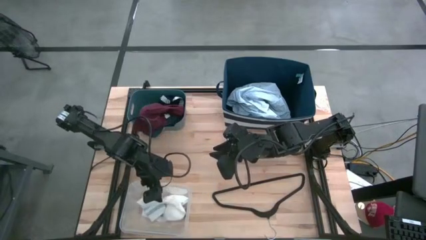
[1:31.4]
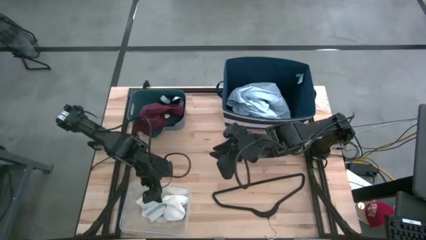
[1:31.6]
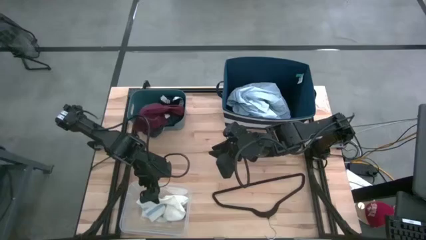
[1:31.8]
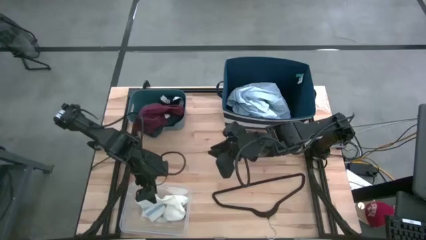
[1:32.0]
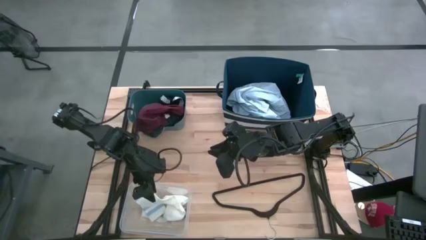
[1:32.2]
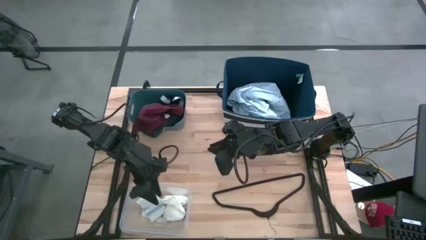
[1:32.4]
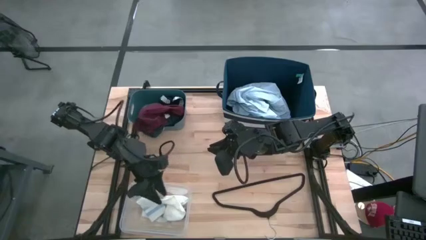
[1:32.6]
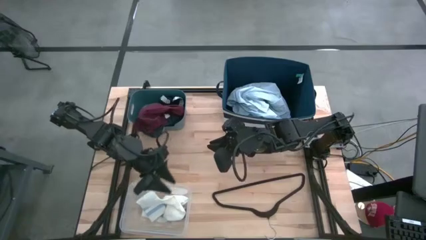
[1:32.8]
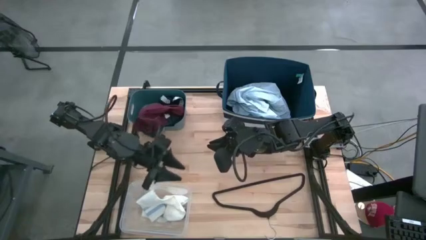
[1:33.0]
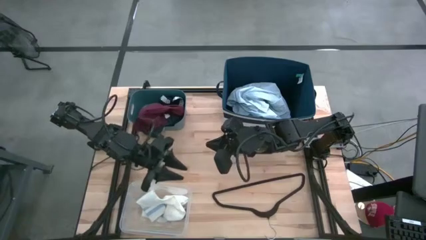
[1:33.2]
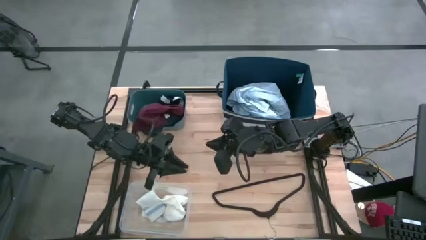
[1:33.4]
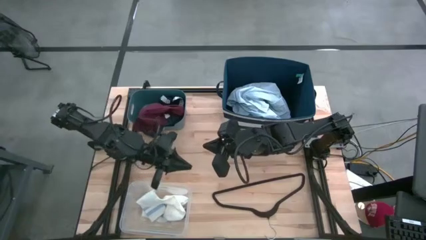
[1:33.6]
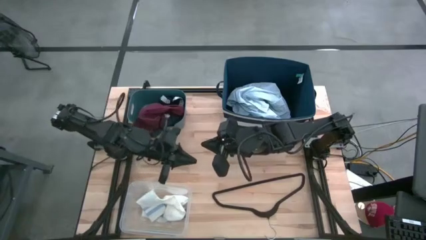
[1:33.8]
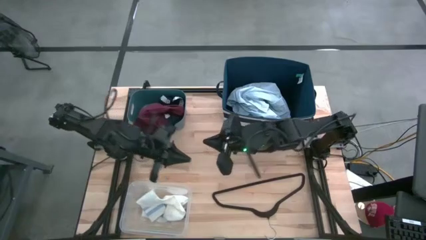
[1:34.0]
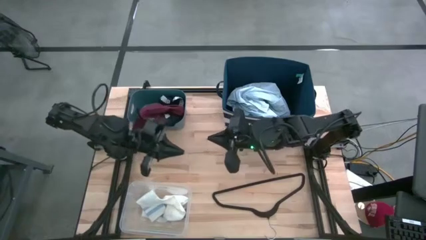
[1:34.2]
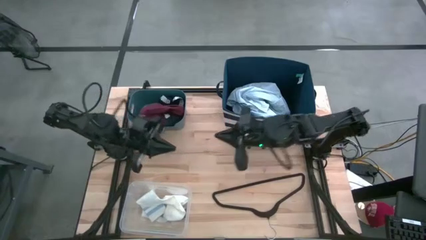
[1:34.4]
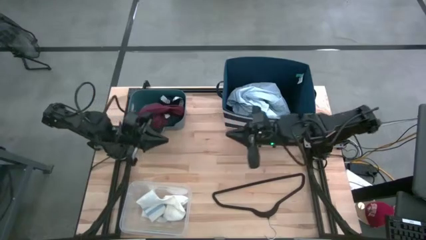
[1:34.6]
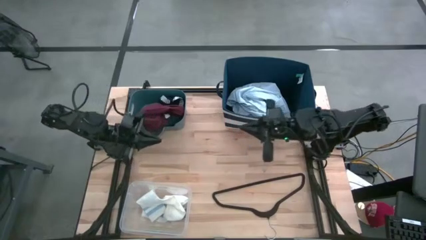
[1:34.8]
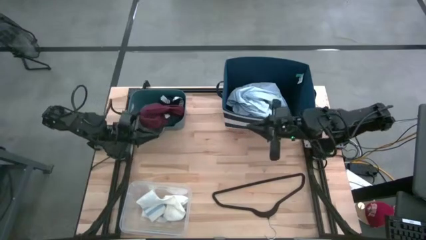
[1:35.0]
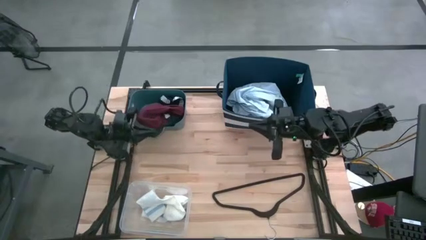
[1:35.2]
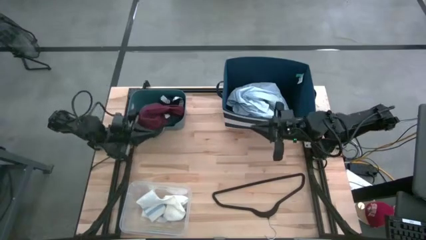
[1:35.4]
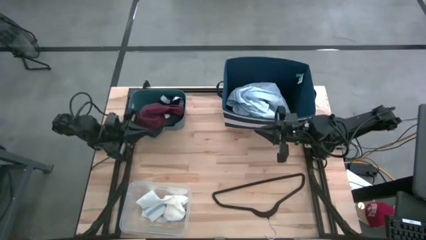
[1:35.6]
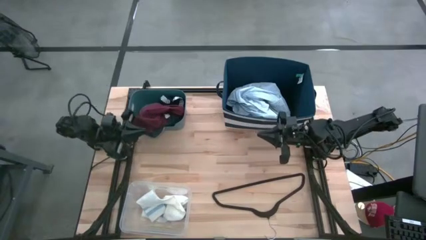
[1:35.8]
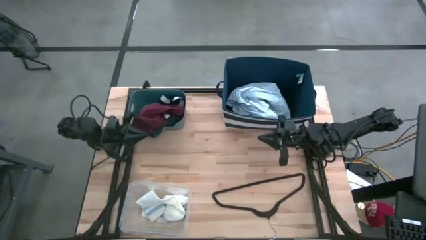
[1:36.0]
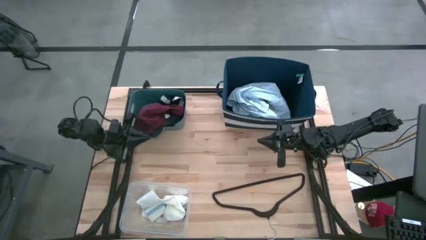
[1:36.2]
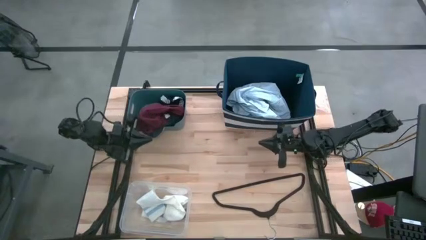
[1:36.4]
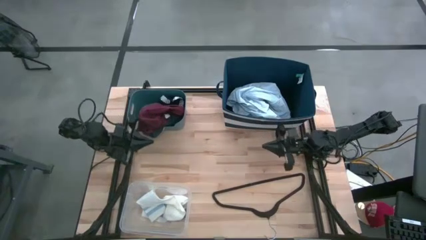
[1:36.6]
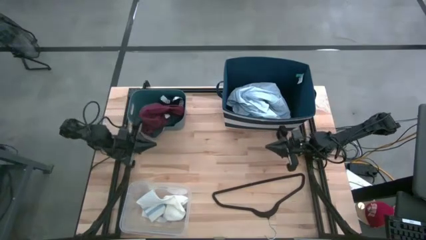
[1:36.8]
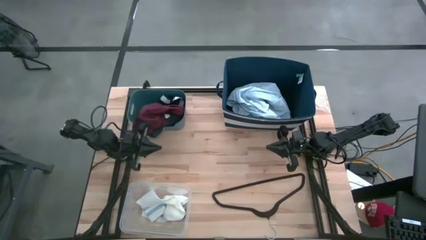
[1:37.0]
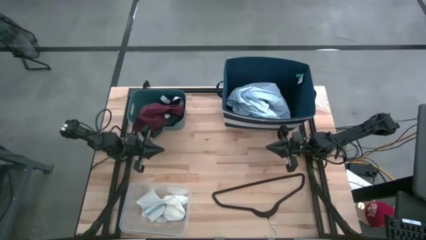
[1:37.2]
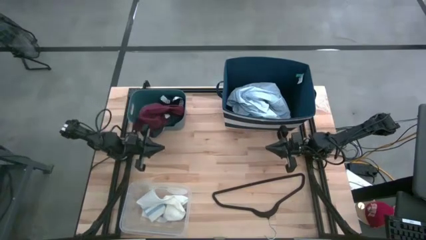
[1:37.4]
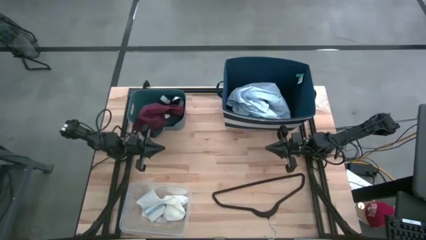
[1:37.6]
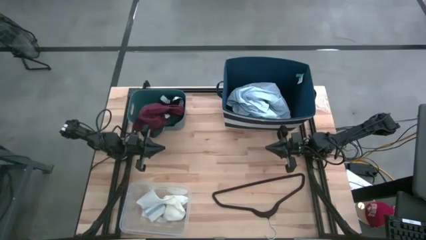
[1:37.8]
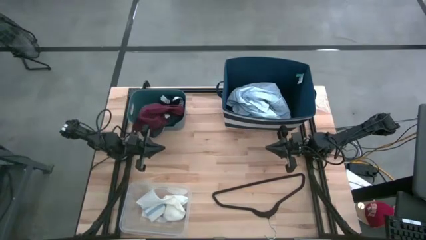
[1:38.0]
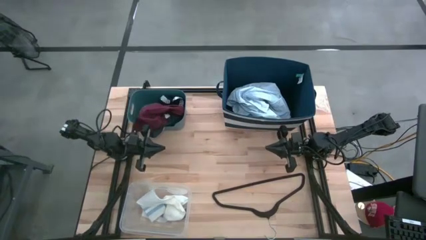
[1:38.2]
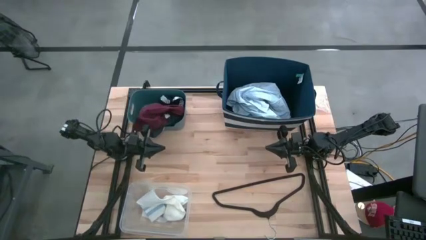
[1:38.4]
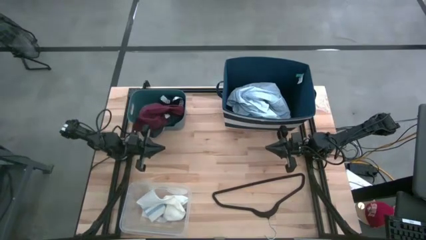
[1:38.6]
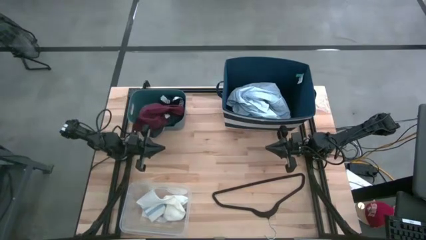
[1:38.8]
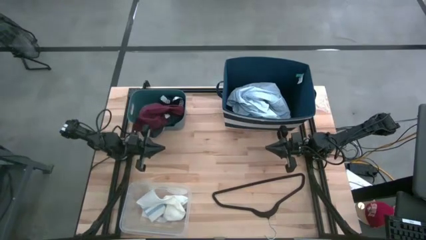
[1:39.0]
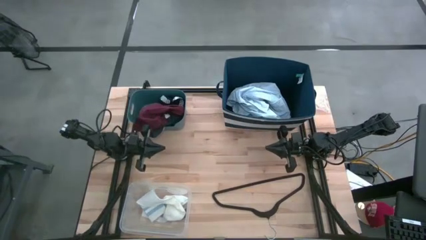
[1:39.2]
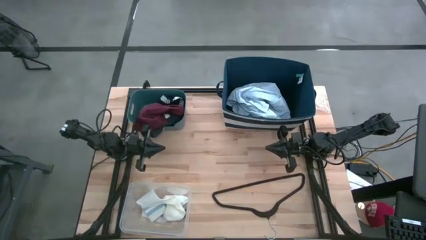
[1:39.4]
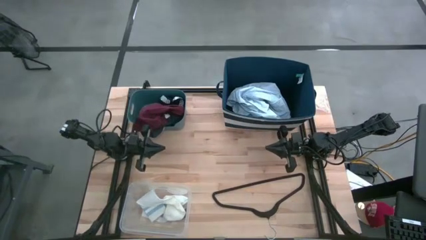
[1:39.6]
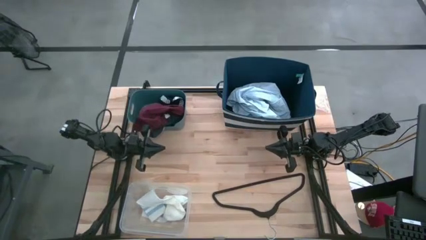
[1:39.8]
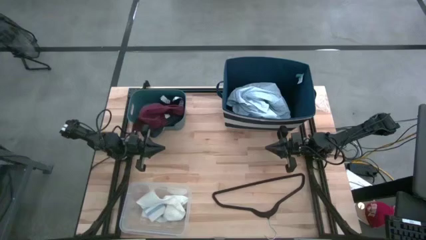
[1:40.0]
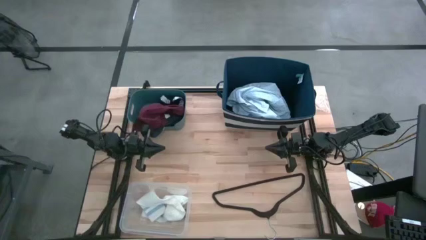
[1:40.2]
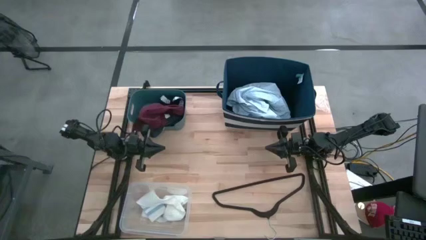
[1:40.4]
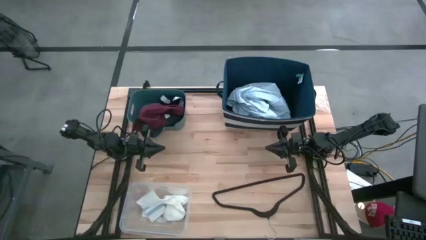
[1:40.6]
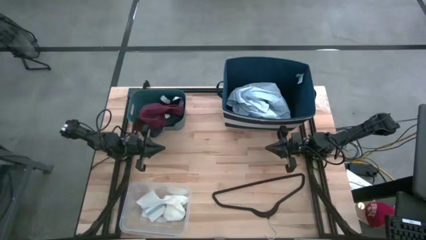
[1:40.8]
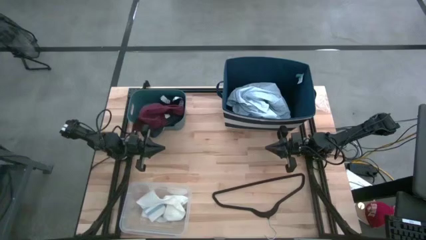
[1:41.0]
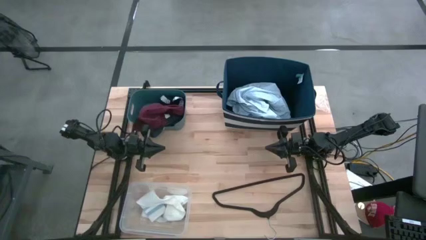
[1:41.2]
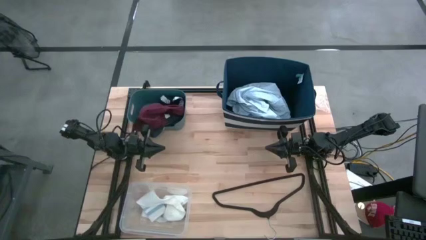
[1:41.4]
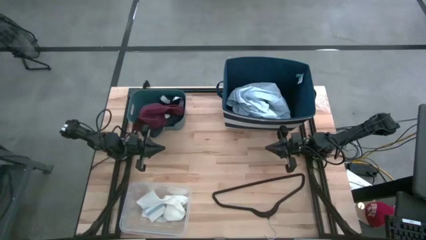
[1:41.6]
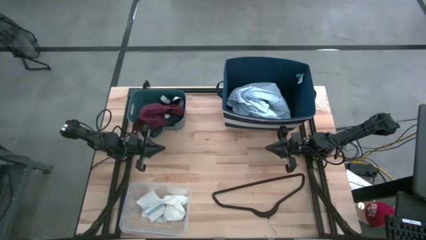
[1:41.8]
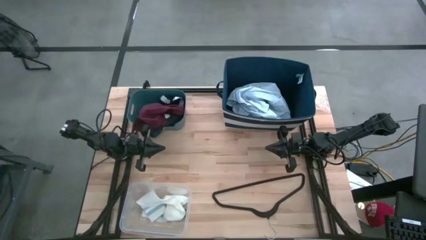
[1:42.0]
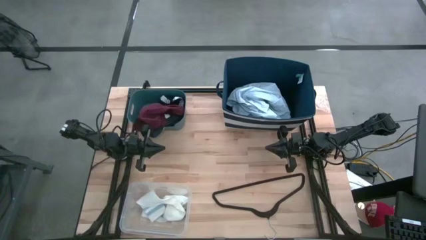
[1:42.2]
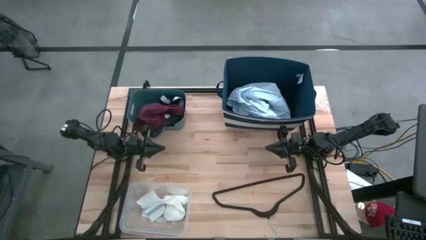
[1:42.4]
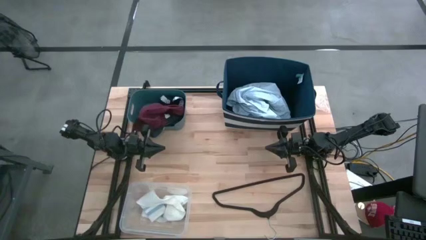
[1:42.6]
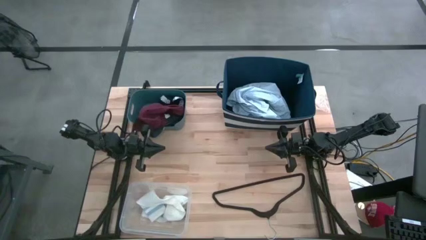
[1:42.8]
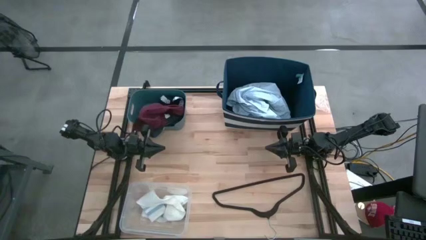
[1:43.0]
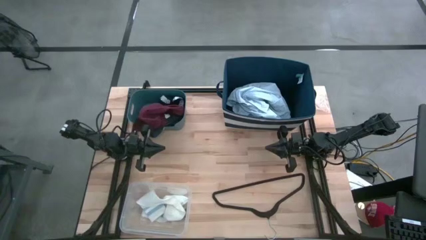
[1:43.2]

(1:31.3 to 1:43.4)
Task: Pick & Place Cloths
Return to Home Position
